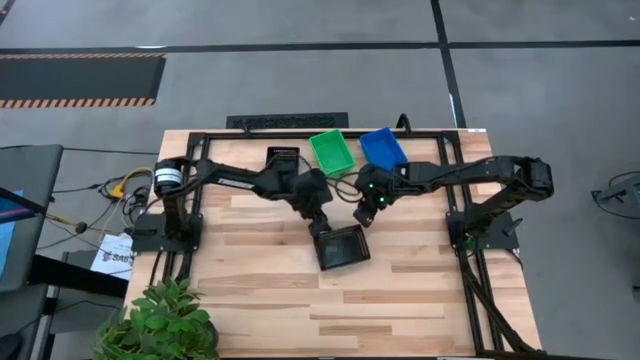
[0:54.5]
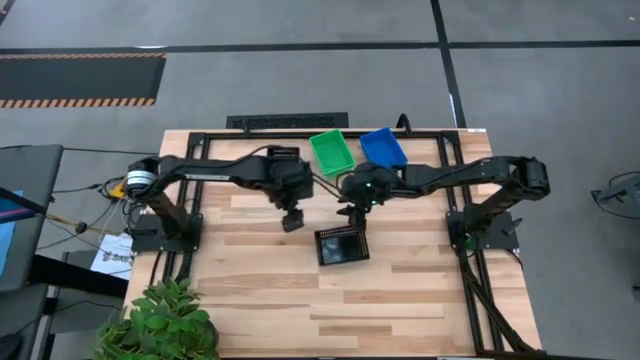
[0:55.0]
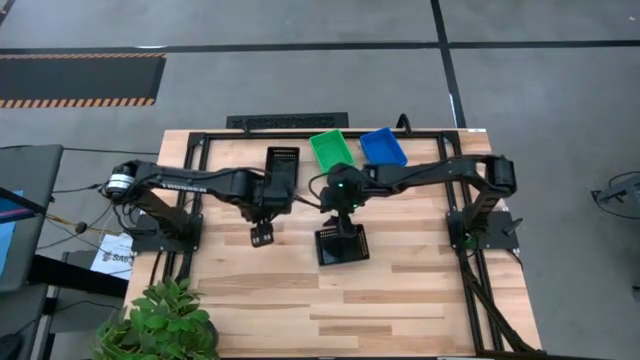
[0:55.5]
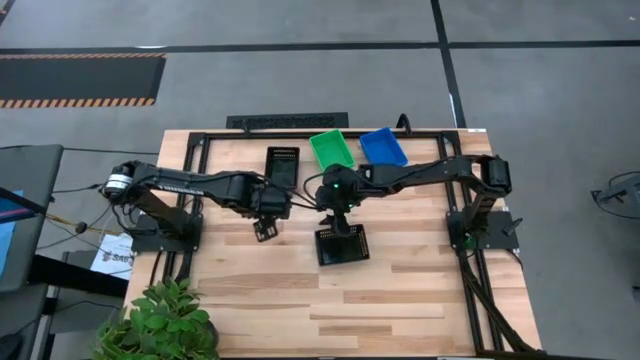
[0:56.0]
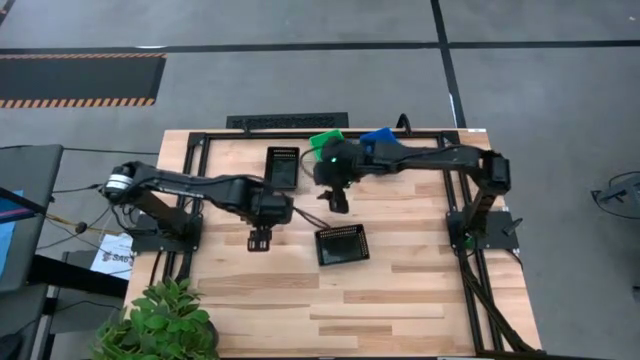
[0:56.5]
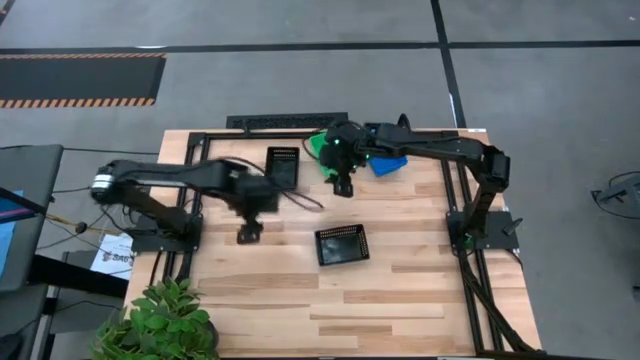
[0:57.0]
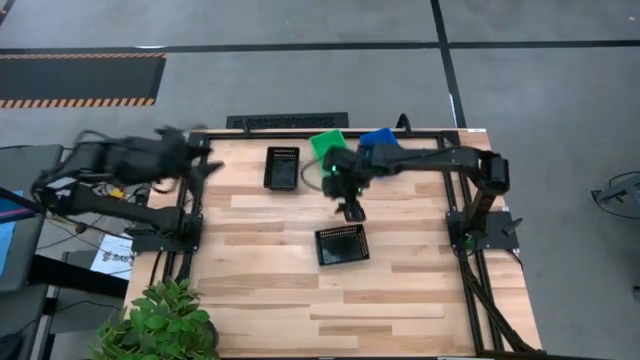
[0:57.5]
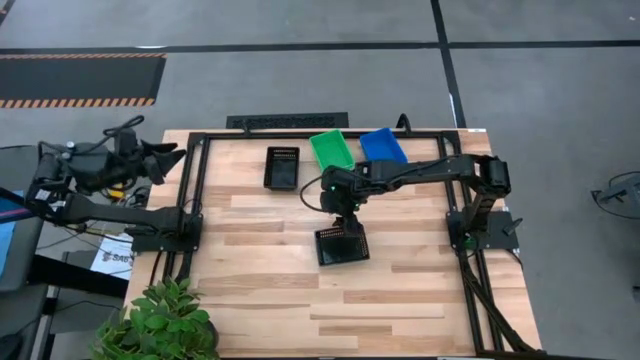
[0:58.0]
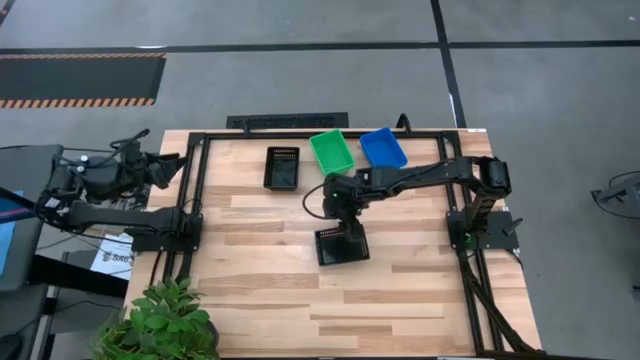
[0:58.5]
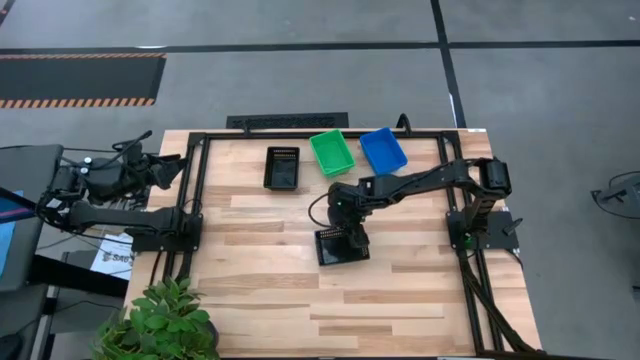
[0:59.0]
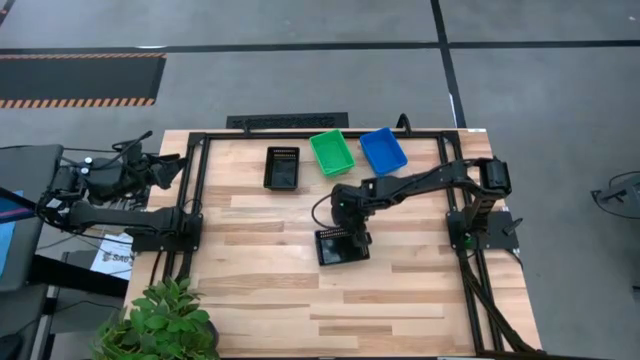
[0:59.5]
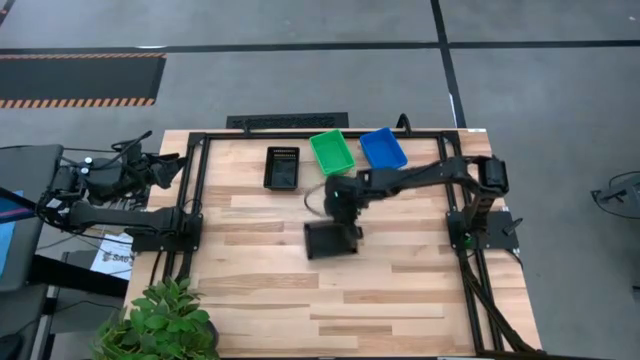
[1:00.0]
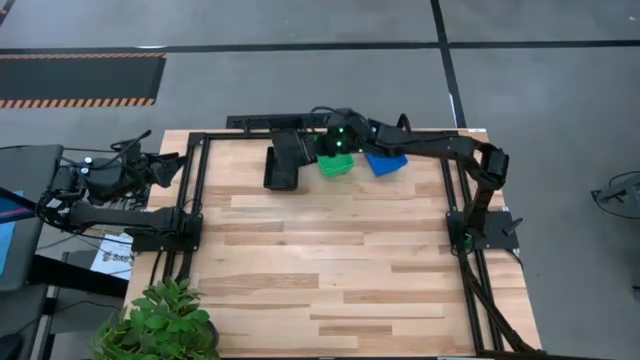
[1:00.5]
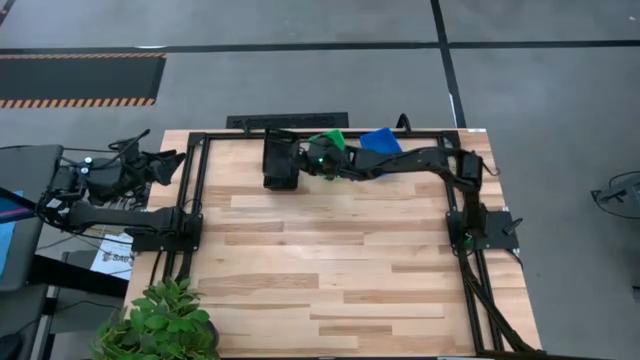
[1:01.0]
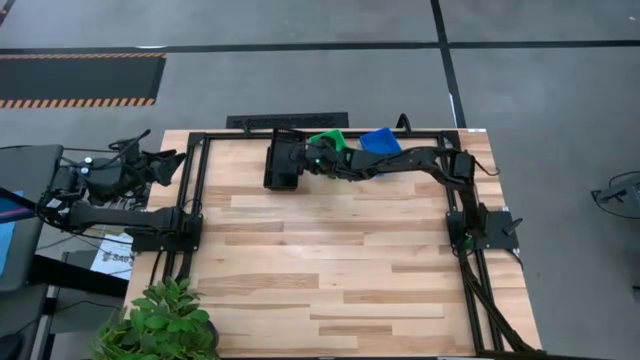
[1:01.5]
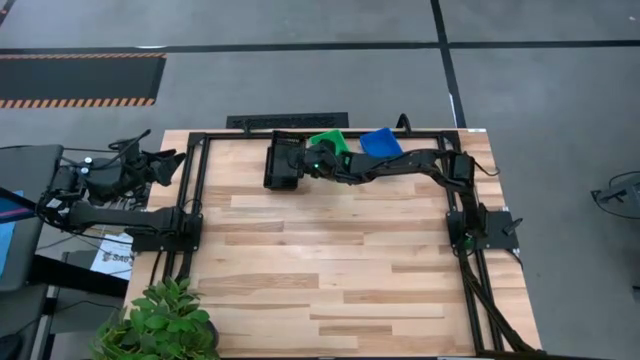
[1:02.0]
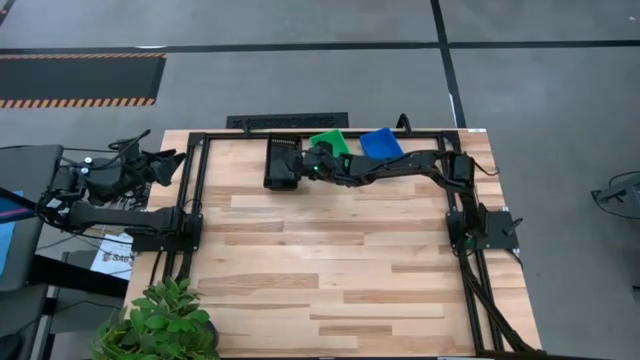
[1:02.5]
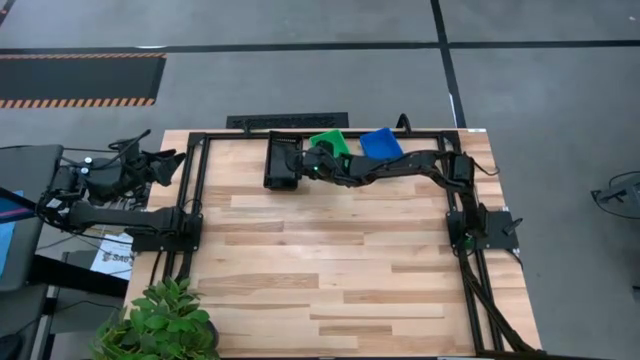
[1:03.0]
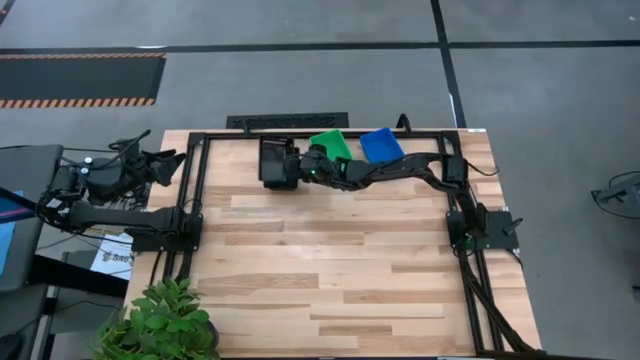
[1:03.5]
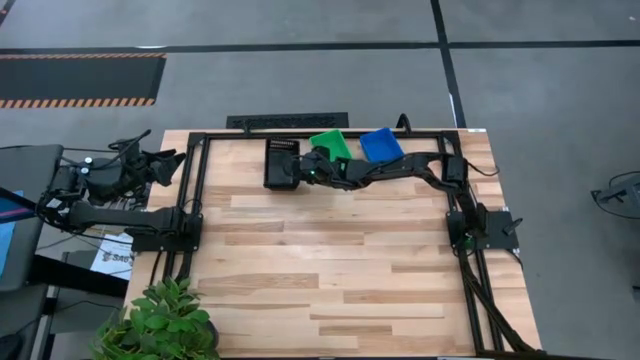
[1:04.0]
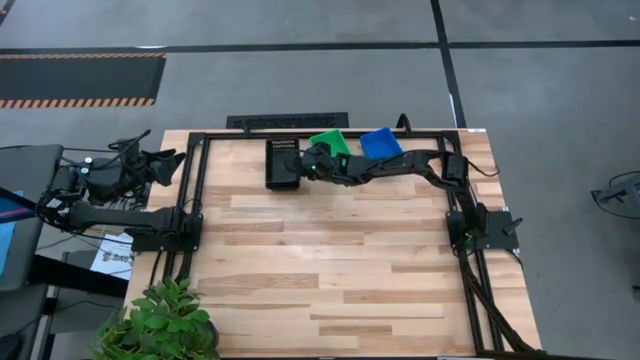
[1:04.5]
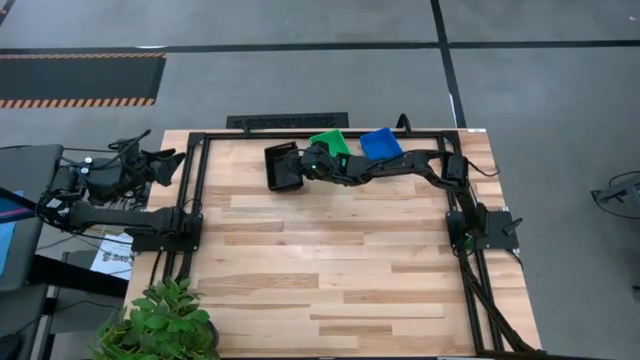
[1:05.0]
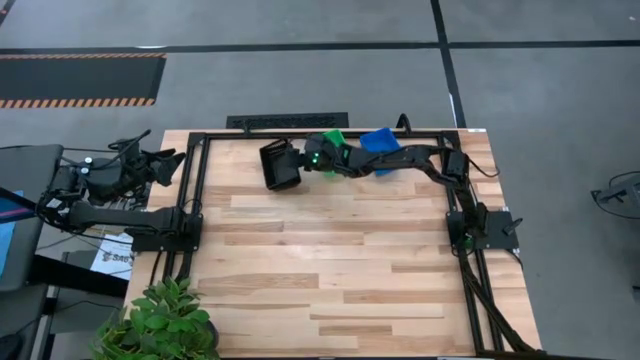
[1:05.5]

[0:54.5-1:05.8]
Stack the black bin on the stacked black bin

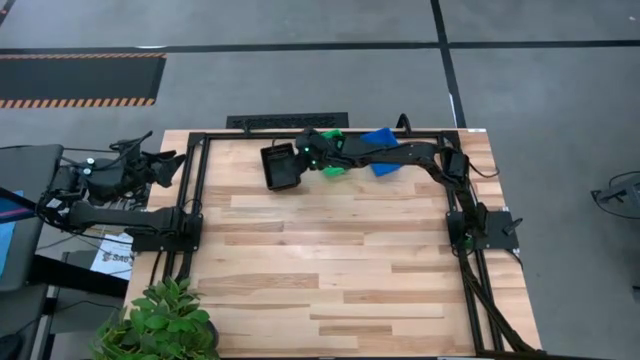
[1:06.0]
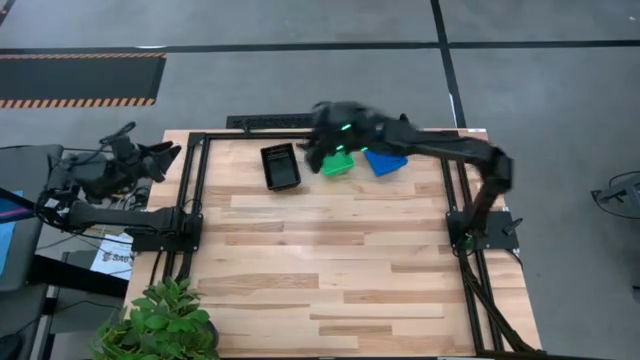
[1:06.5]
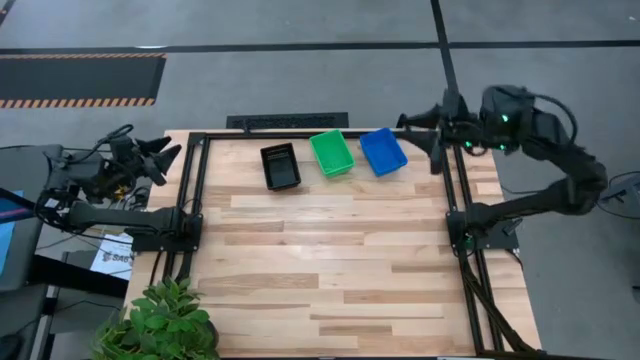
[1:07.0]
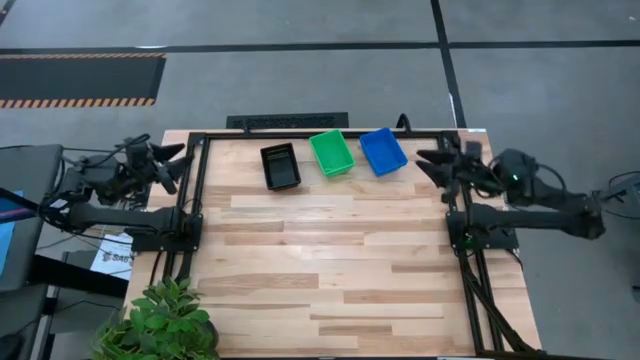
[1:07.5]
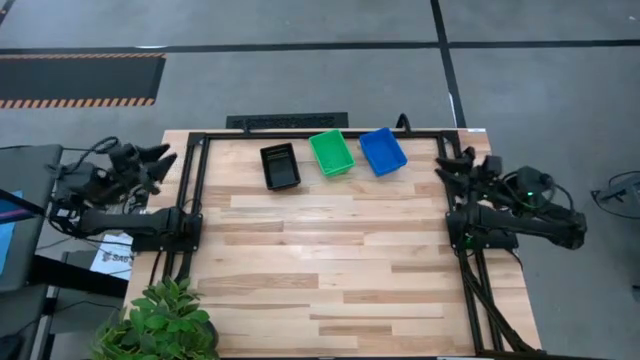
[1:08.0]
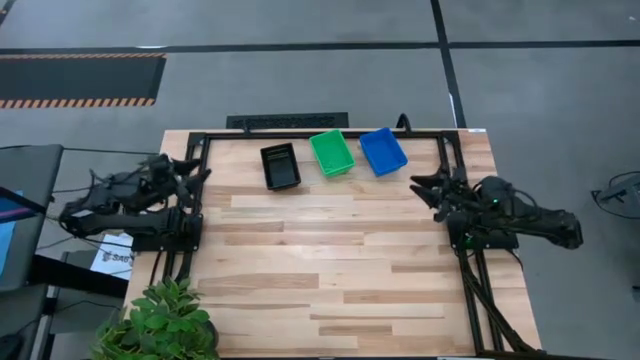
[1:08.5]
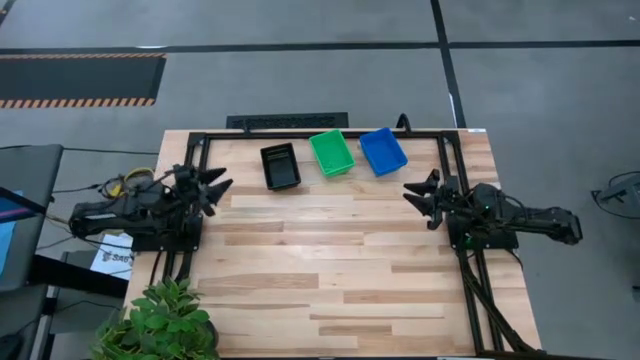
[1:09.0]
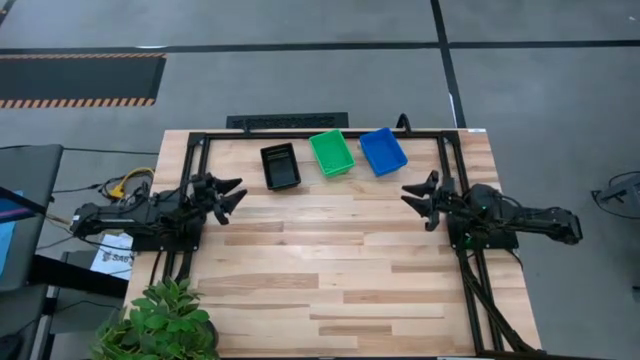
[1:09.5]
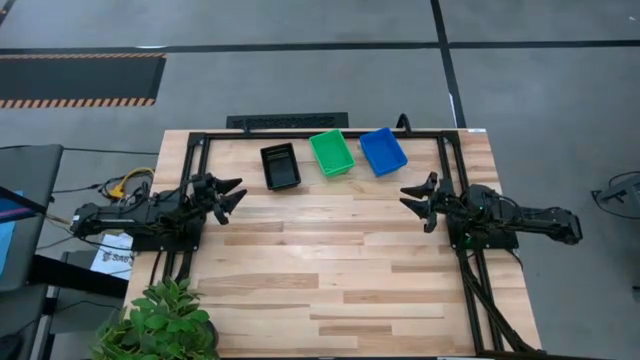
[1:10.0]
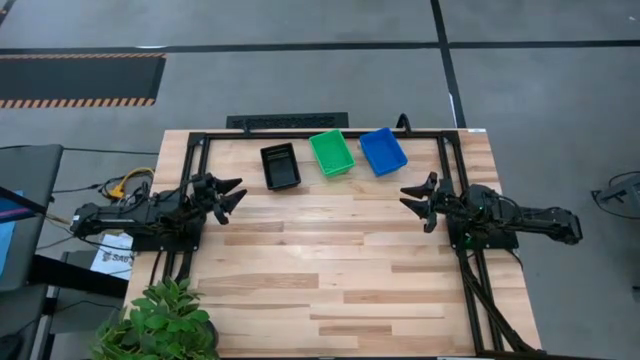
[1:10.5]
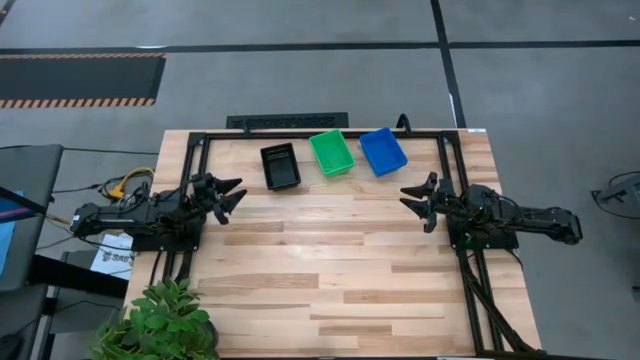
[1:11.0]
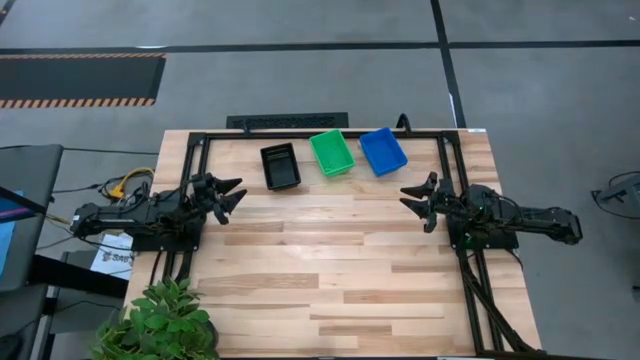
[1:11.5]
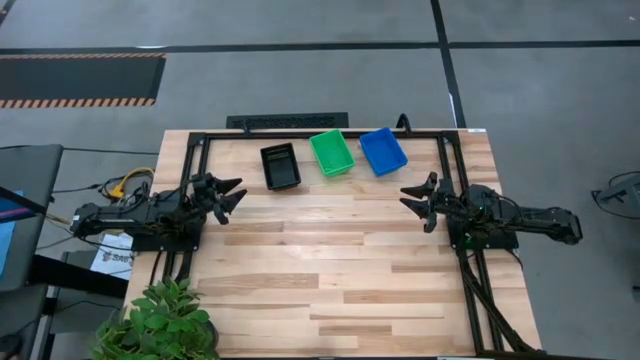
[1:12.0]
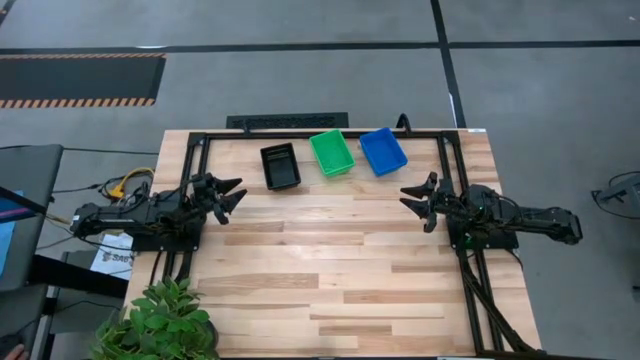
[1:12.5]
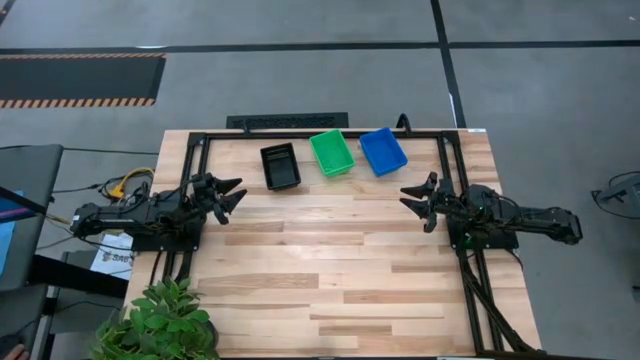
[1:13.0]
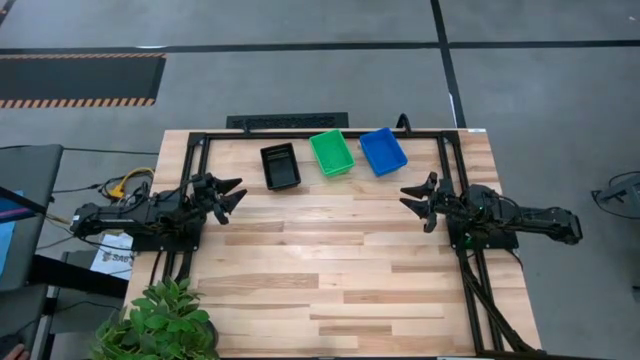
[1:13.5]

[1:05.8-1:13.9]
Return to Home Position

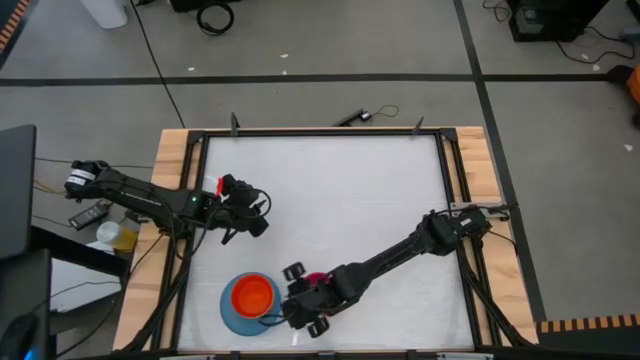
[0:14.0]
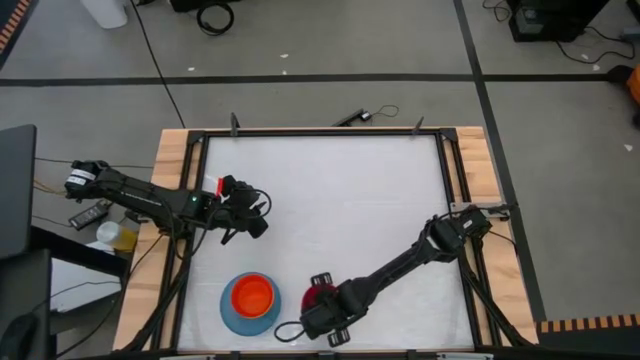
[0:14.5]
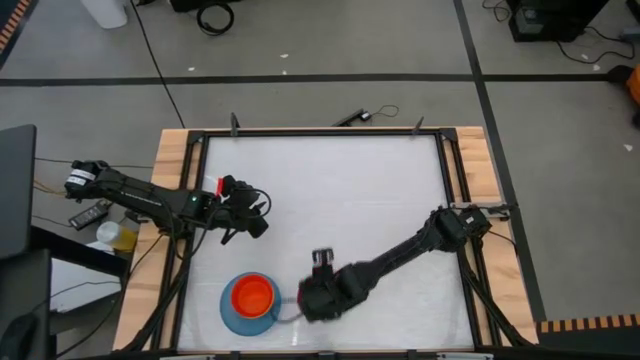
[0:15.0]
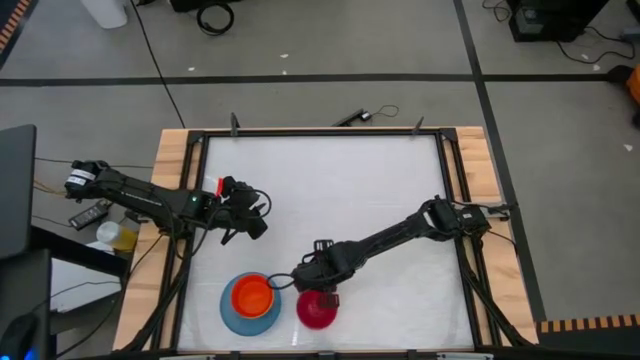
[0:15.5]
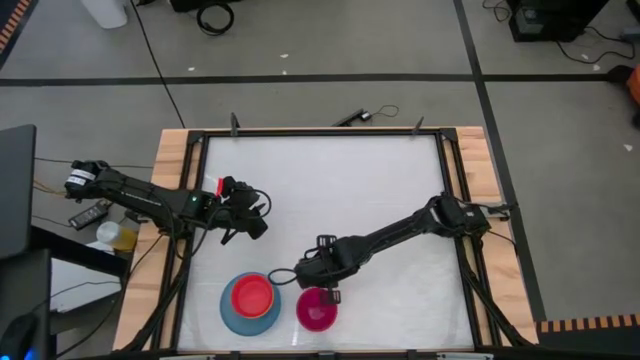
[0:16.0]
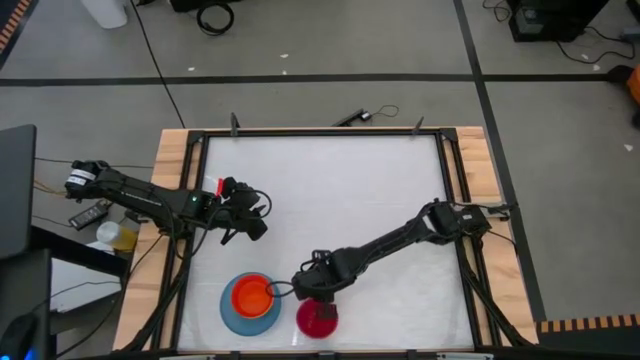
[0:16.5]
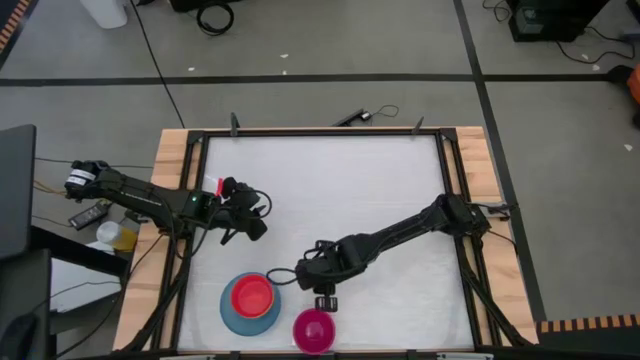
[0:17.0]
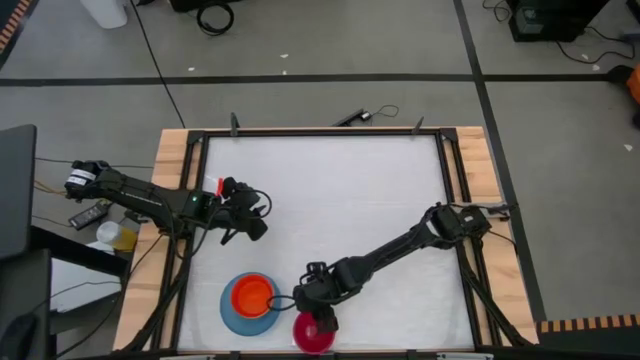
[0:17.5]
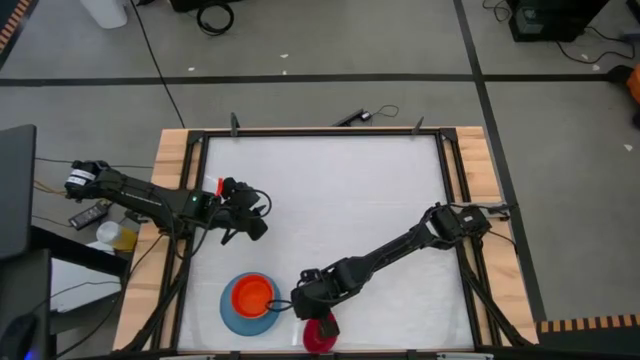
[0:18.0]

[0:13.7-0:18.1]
Stack the red bowl on top of the orange bowl
